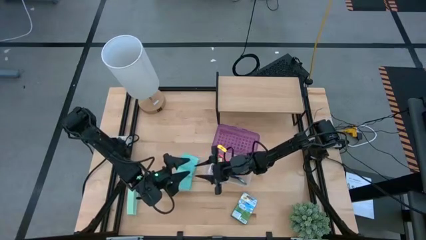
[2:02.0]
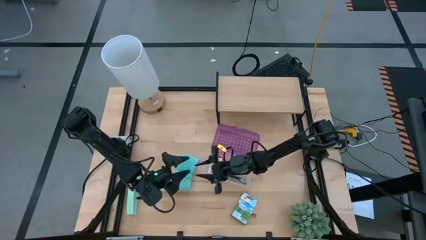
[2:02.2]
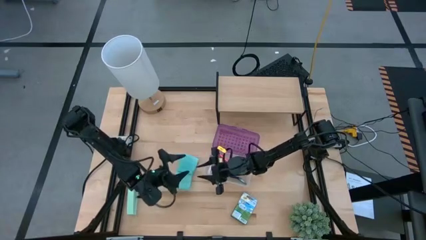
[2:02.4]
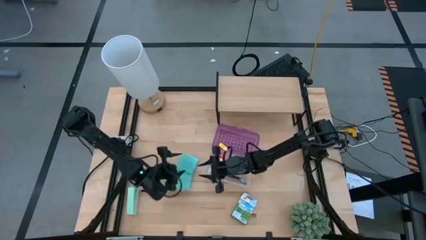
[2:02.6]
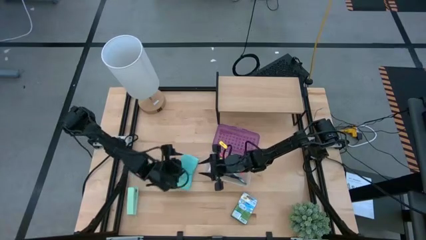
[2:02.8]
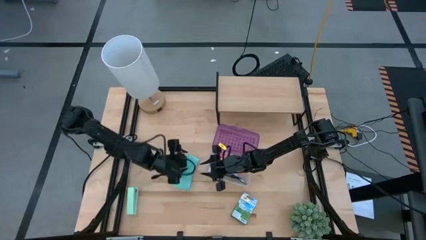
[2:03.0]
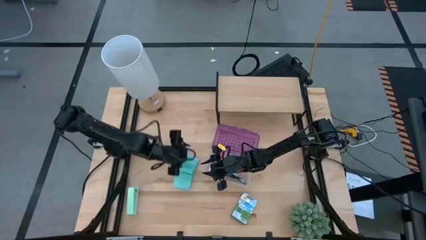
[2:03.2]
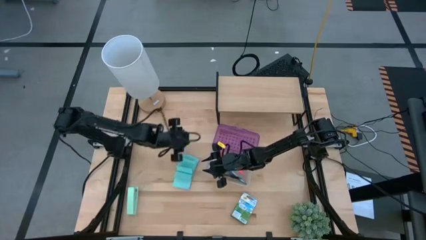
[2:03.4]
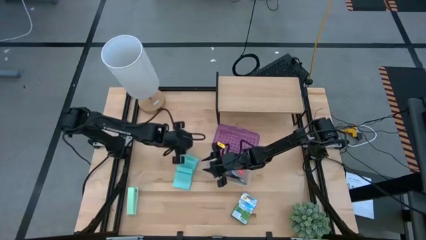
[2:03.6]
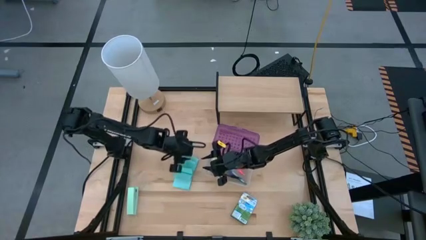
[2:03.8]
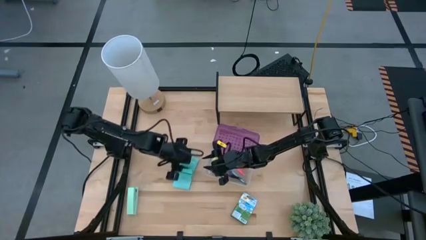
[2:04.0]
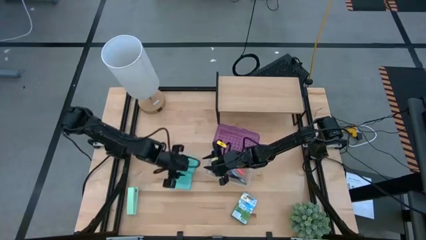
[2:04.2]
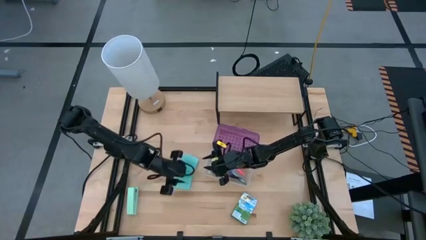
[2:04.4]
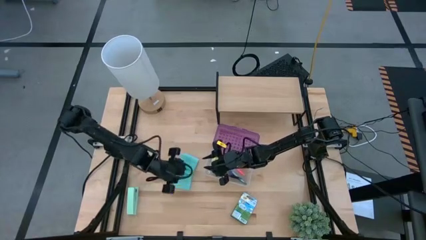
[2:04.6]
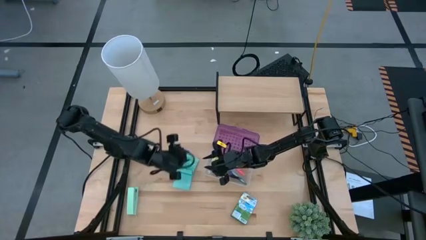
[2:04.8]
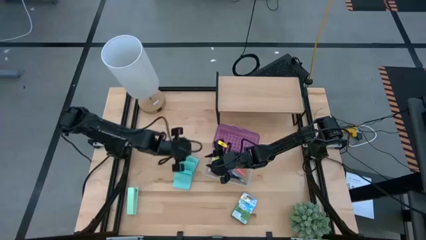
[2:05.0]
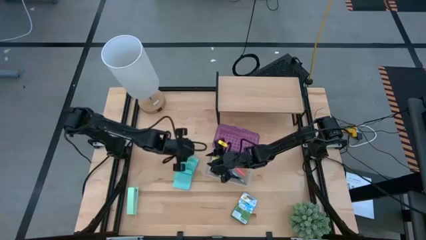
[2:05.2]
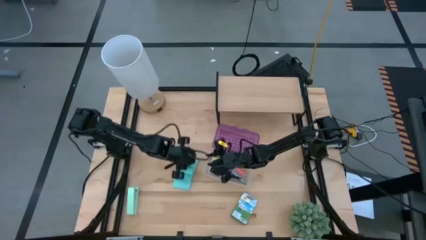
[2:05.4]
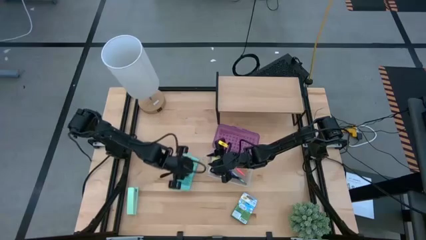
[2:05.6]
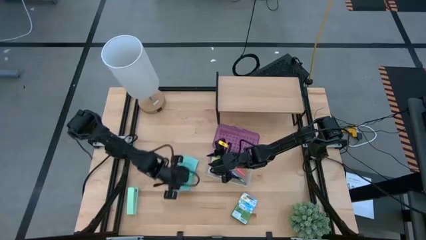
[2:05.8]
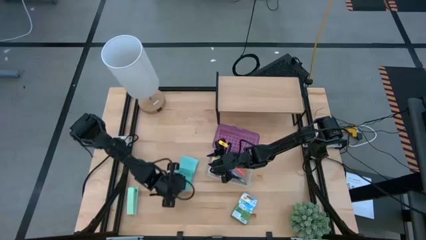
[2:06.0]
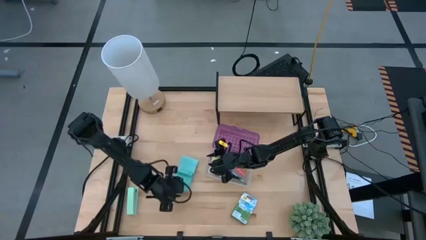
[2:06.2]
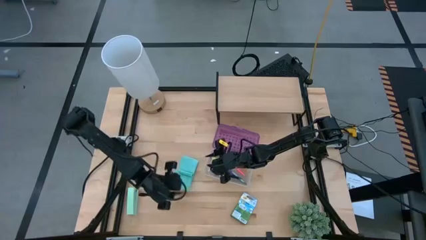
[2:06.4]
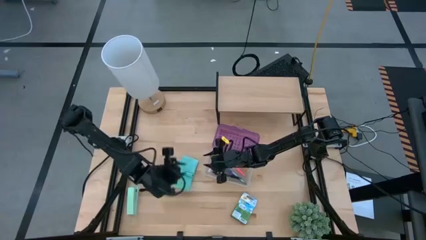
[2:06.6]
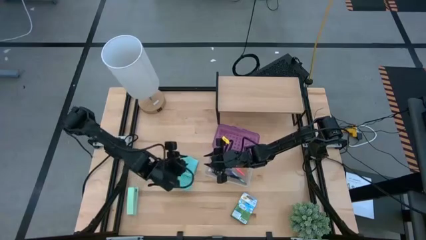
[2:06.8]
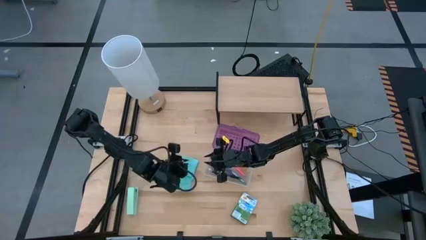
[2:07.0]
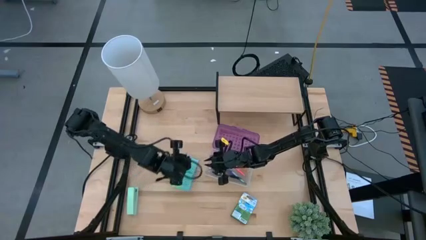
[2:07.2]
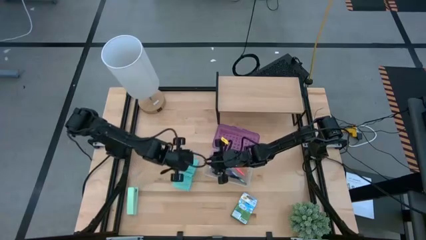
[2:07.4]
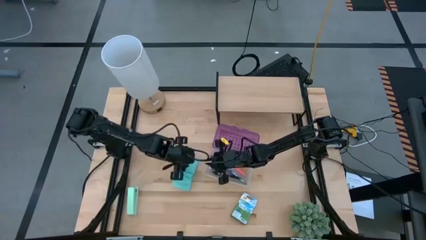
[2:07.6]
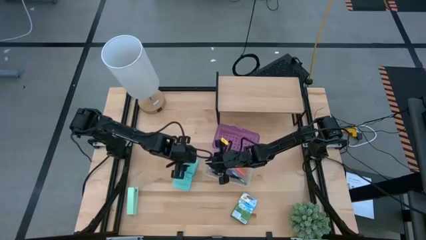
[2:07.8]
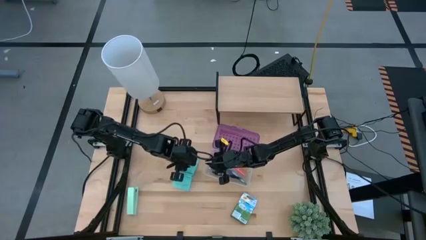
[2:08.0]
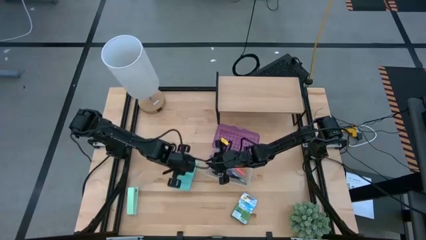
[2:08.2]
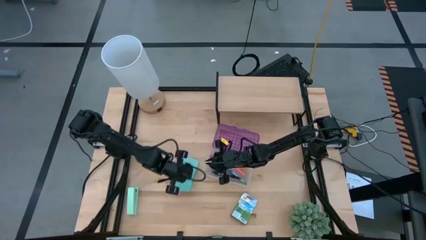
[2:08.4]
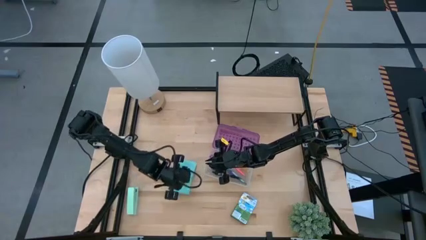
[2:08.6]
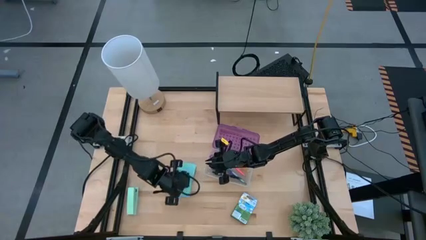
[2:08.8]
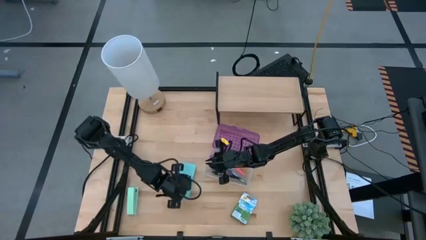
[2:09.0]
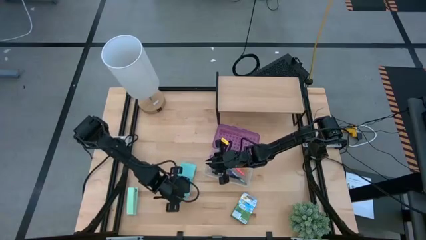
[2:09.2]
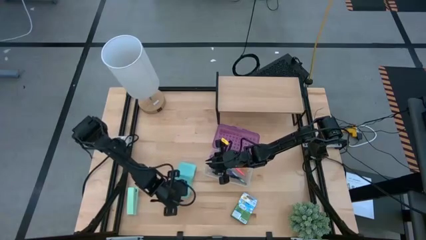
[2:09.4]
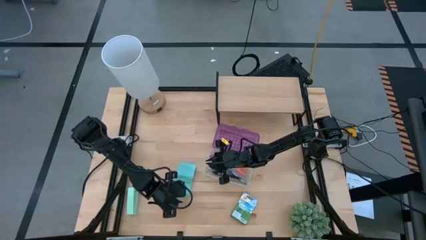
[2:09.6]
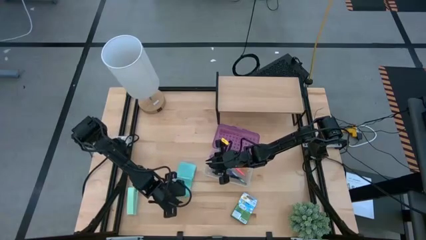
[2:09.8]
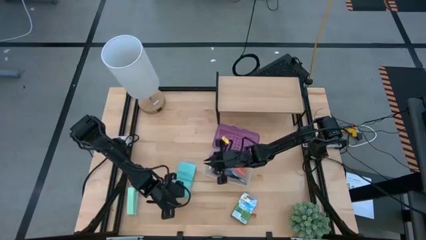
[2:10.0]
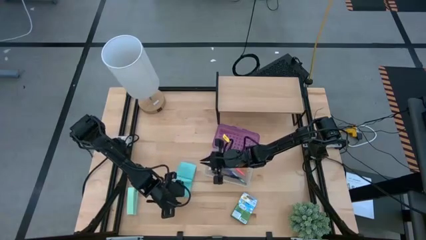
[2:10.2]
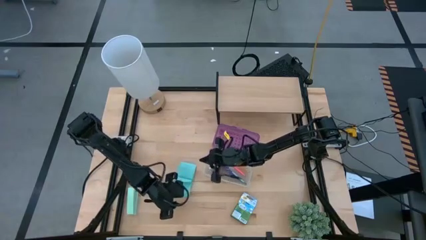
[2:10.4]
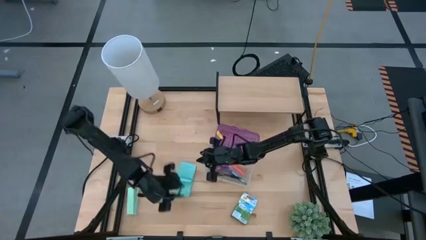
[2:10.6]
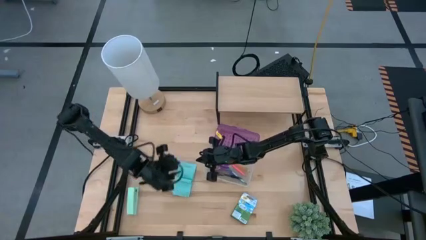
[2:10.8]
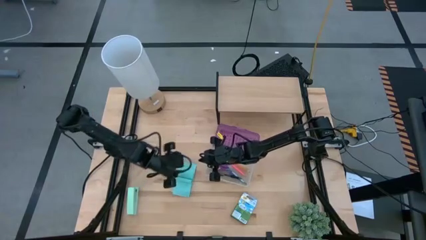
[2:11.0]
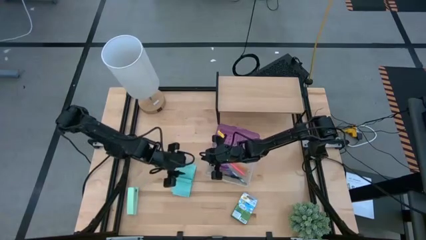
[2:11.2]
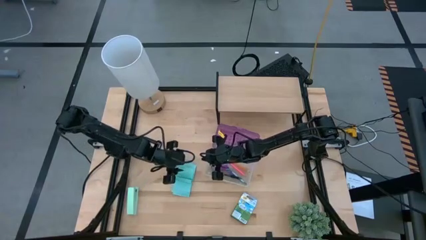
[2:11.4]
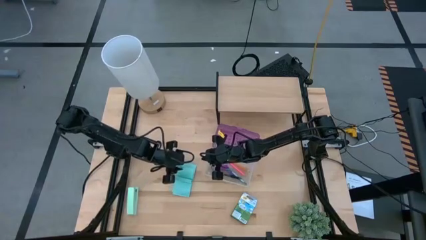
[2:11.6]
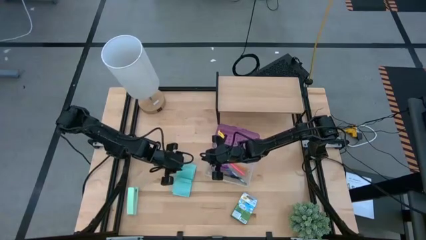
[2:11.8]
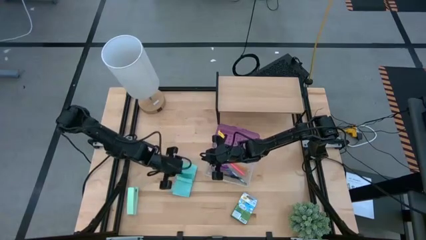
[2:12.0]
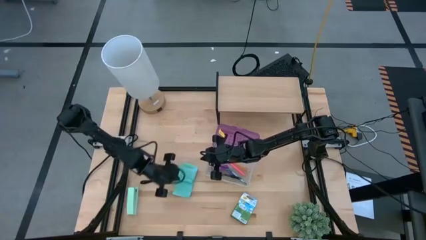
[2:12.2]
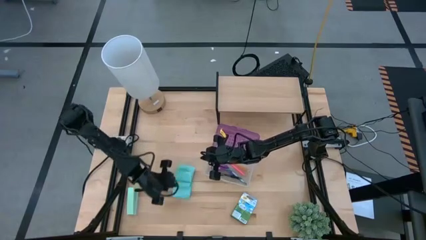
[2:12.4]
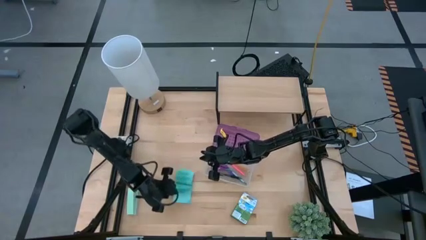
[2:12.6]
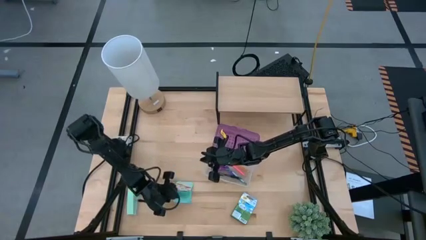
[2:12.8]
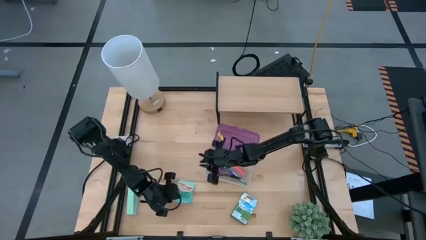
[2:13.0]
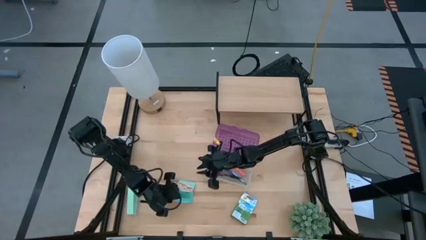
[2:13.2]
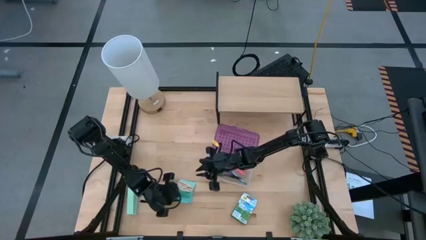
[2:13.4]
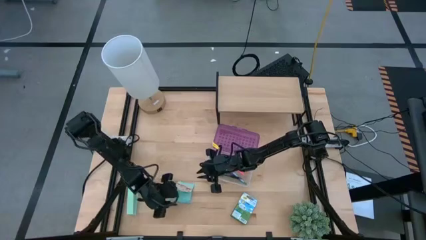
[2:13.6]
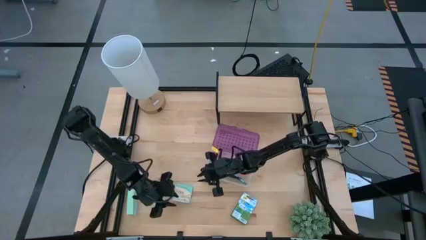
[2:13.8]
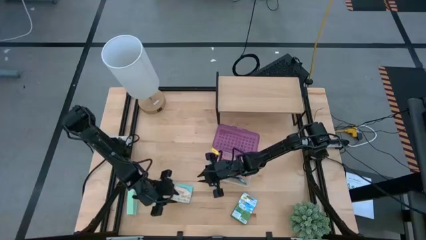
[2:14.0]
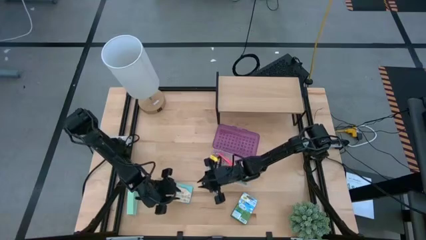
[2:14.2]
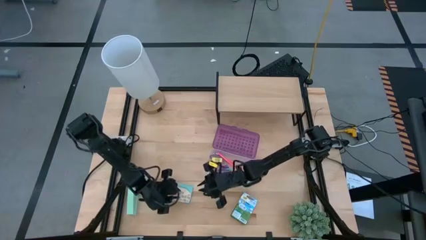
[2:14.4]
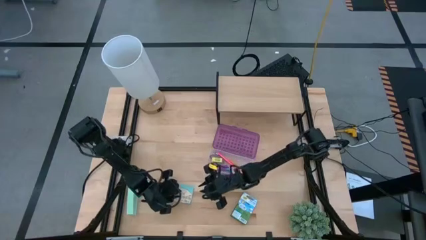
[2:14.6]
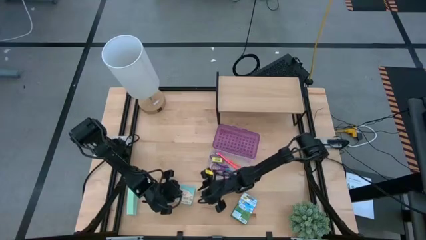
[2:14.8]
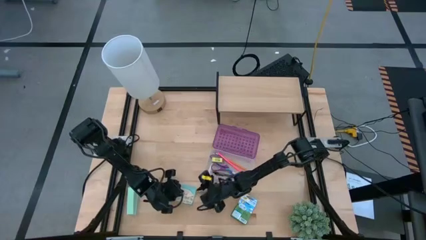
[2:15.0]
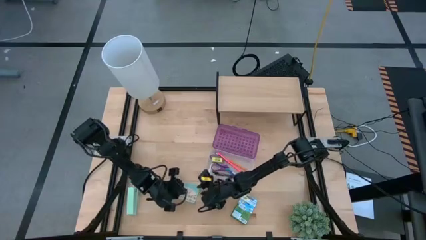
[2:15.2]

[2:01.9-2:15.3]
Task: Pack school essentials
Put the blue sticky notes into the purple supply box

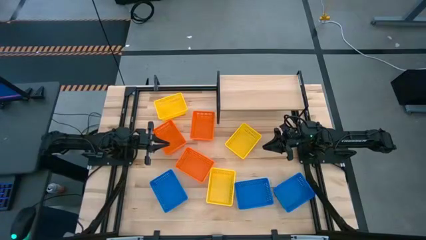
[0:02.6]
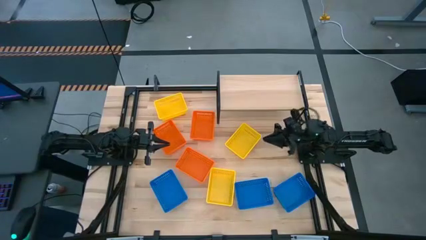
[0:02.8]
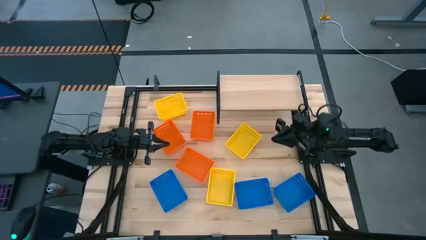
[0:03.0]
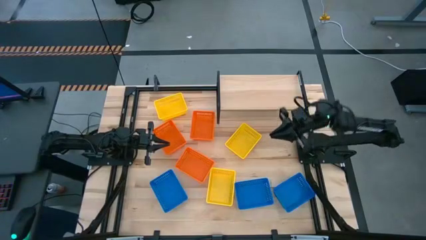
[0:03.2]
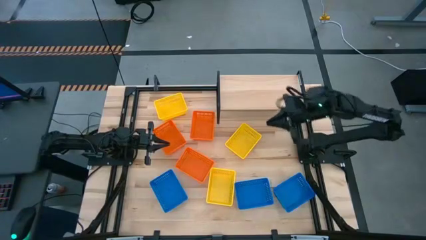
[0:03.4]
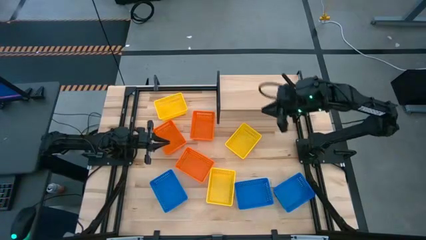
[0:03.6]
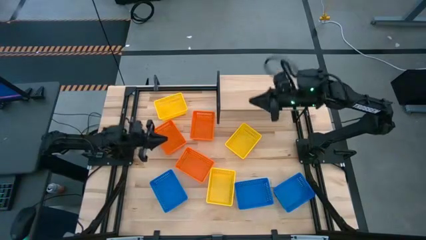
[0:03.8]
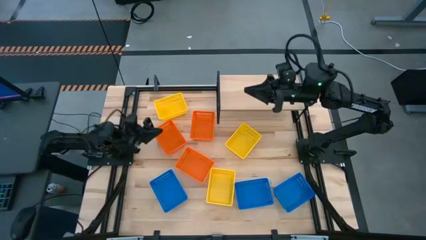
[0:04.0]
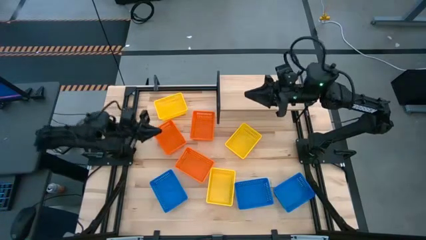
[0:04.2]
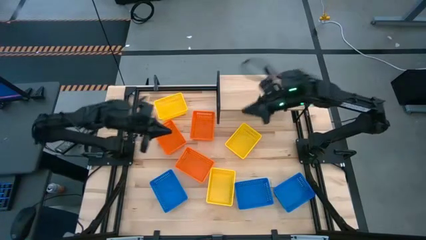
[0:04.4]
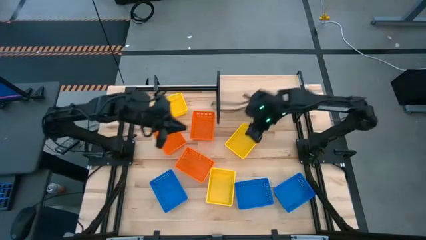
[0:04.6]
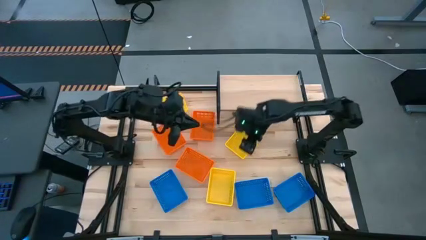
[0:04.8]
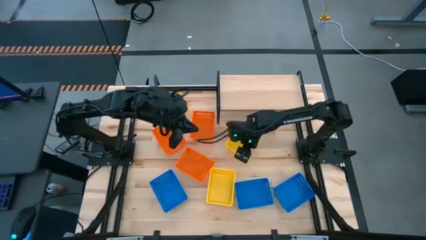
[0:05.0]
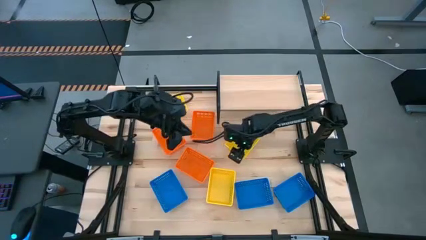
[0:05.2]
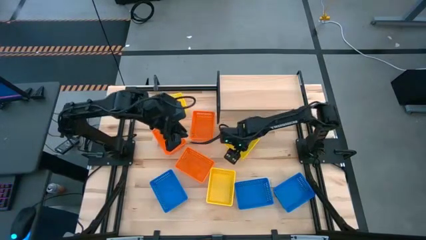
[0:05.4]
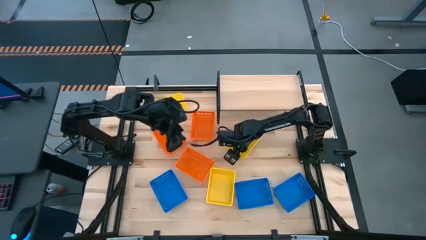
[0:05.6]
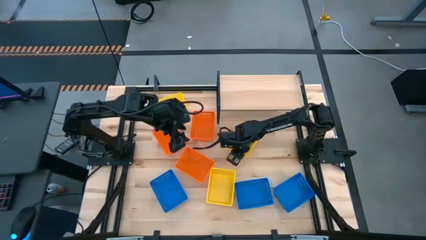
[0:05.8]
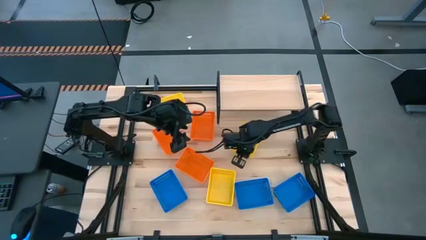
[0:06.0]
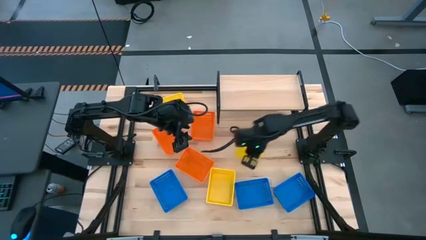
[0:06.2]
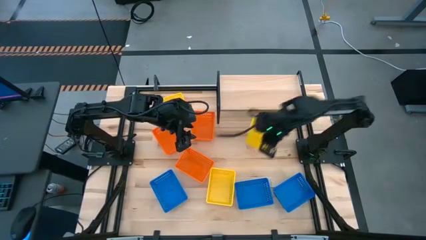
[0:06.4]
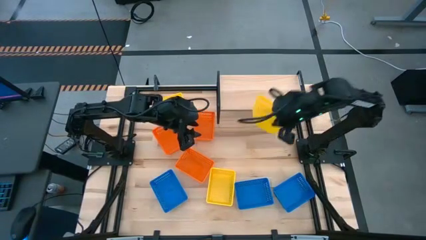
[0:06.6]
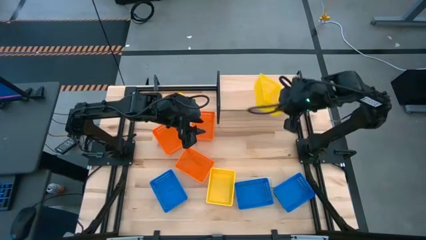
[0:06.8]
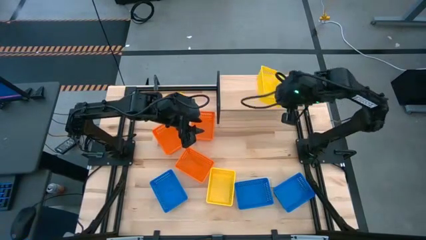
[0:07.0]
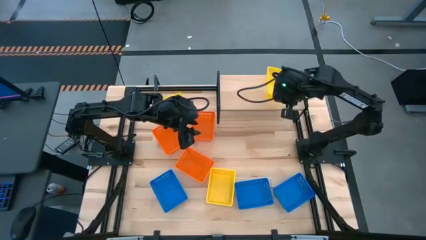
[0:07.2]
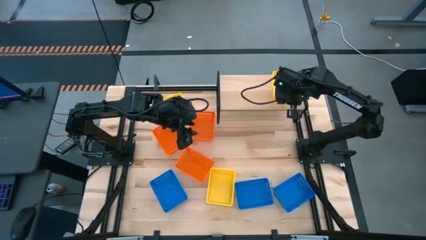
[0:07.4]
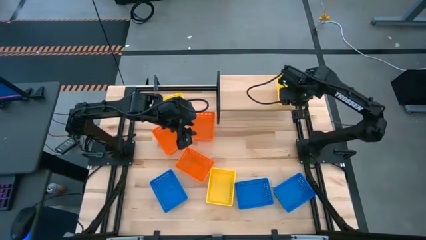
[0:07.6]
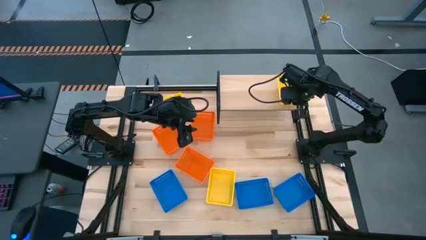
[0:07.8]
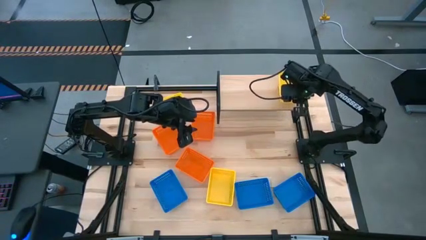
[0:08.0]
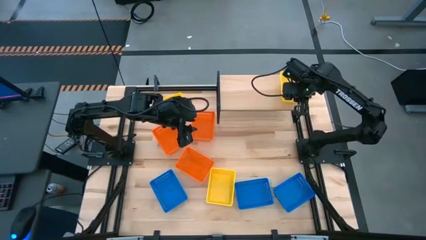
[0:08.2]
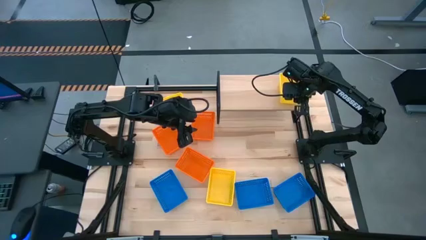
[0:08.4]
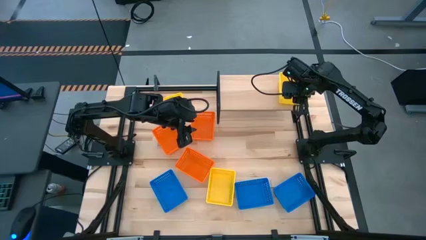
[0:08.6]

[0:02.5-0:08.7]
Task: Stack baskets on shelf by color
Put the middle yellow basket on the shelf
